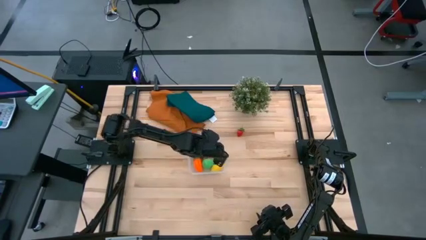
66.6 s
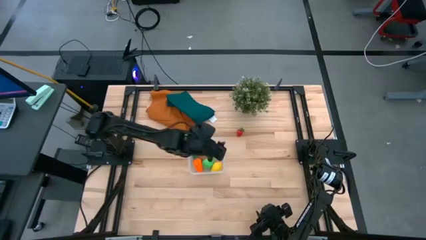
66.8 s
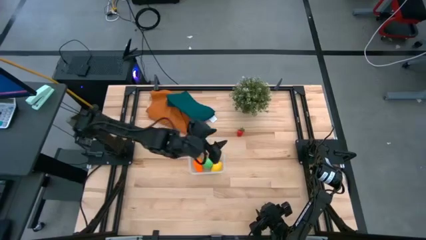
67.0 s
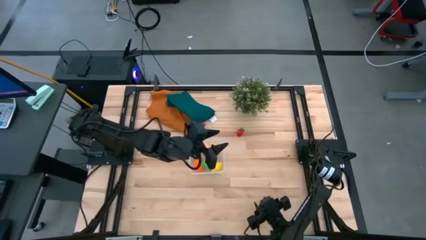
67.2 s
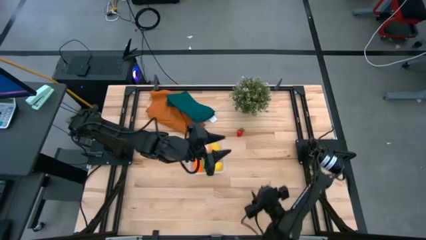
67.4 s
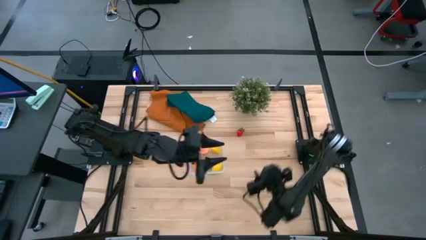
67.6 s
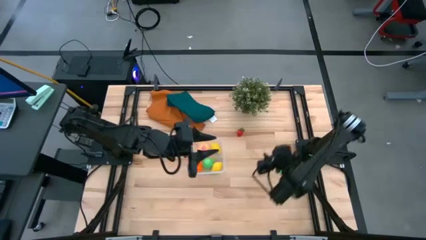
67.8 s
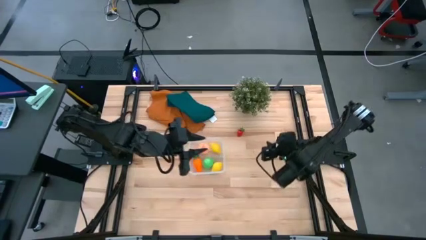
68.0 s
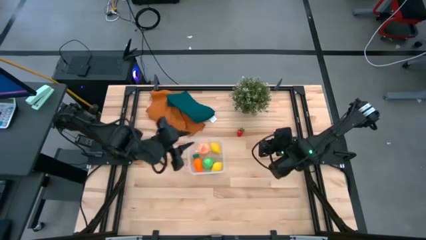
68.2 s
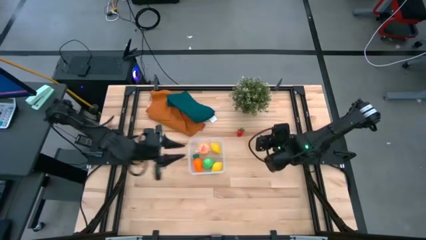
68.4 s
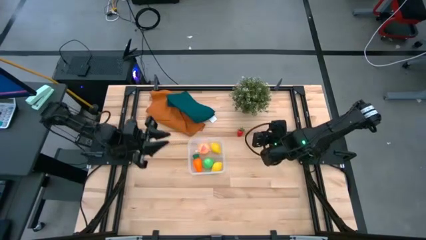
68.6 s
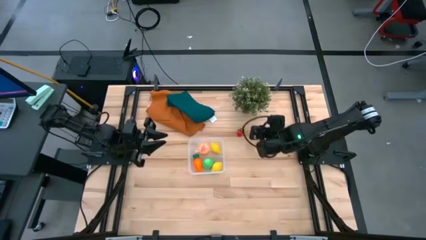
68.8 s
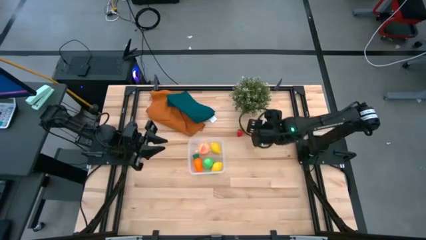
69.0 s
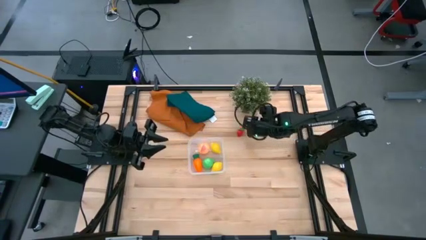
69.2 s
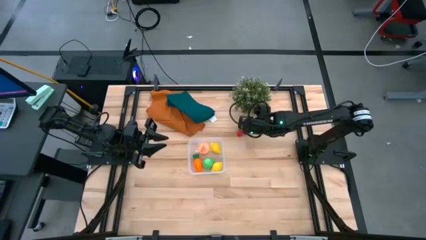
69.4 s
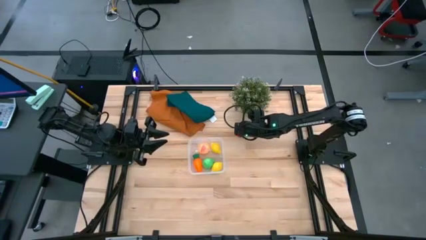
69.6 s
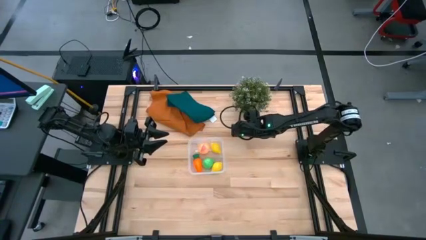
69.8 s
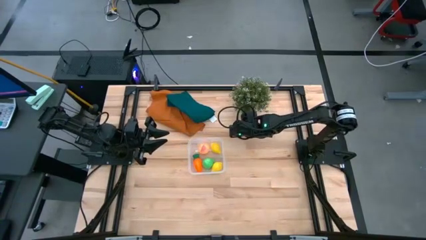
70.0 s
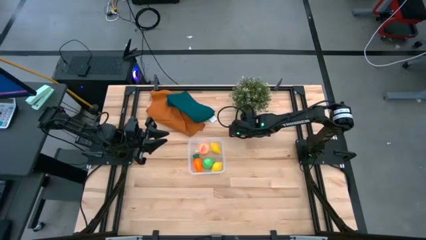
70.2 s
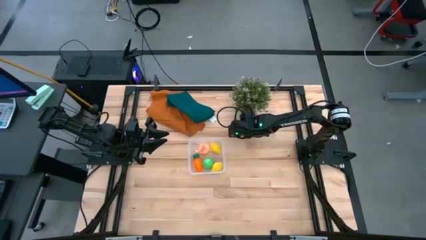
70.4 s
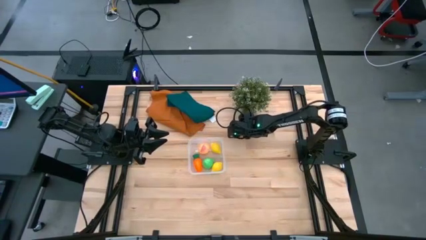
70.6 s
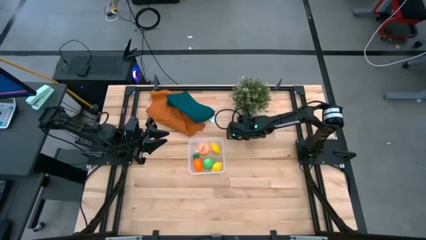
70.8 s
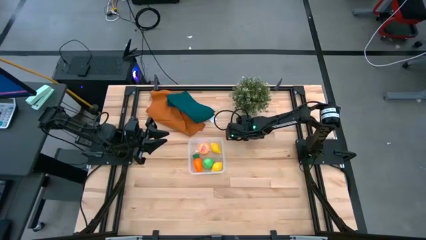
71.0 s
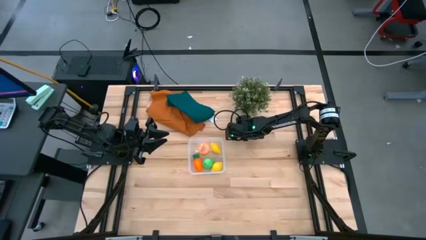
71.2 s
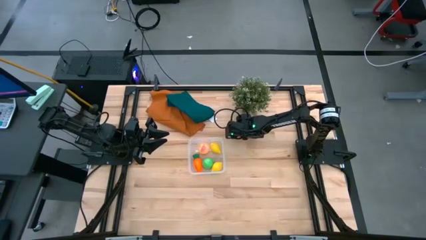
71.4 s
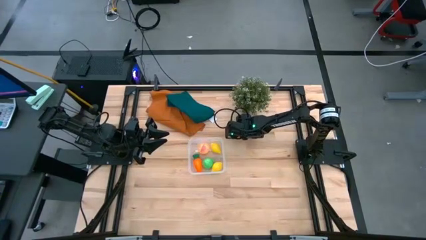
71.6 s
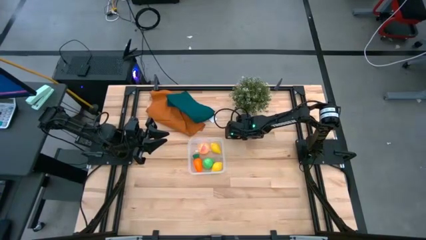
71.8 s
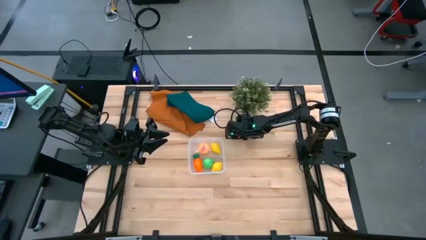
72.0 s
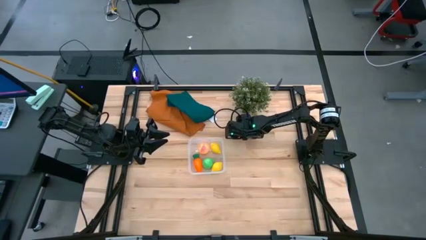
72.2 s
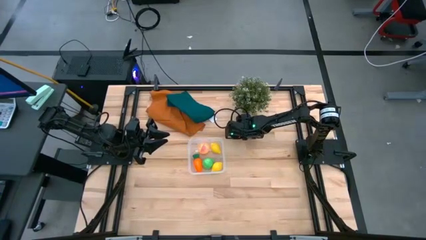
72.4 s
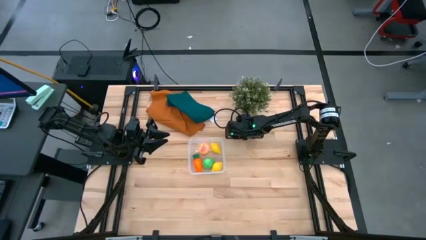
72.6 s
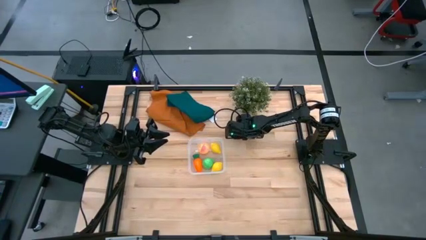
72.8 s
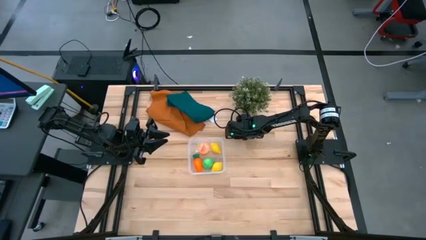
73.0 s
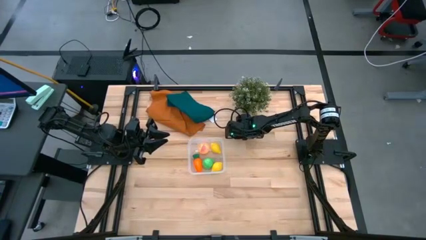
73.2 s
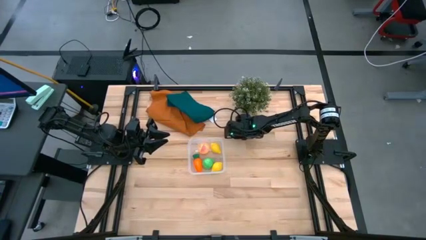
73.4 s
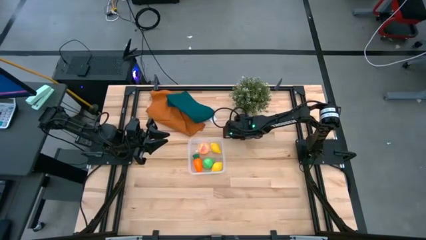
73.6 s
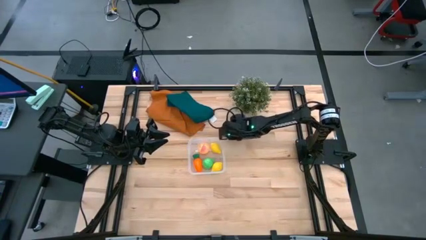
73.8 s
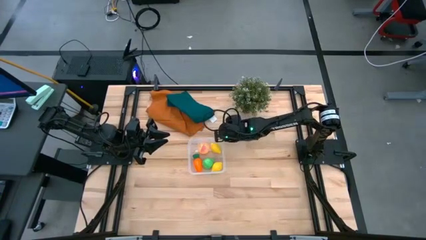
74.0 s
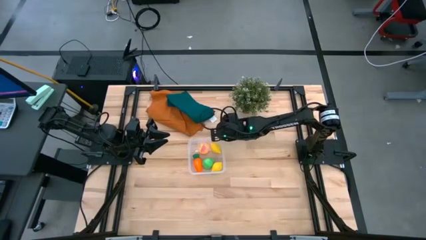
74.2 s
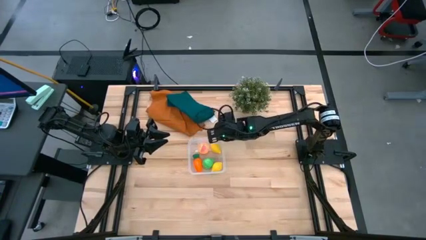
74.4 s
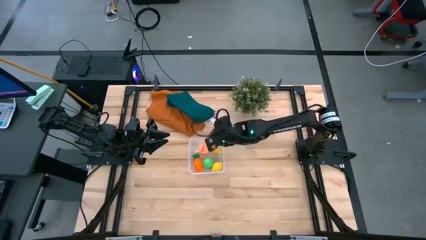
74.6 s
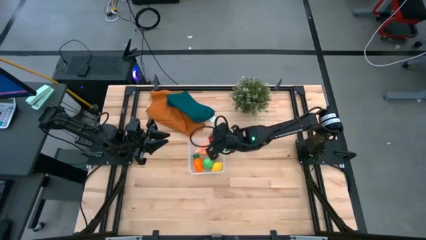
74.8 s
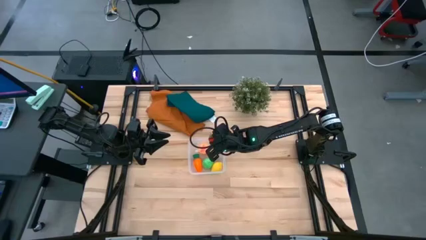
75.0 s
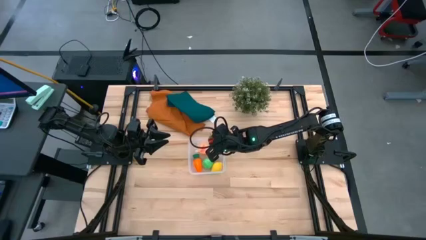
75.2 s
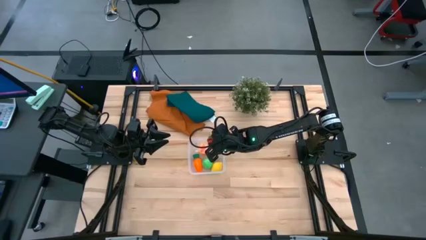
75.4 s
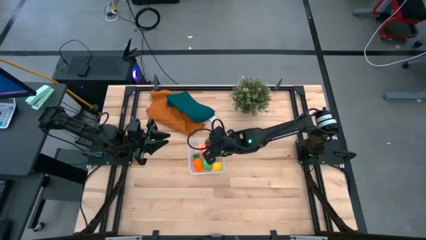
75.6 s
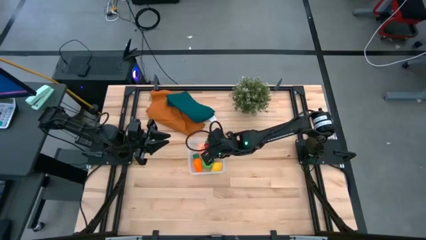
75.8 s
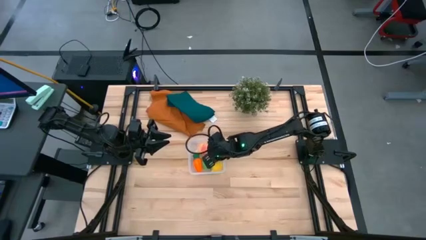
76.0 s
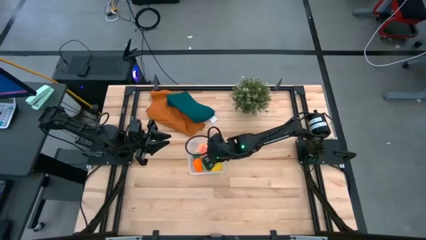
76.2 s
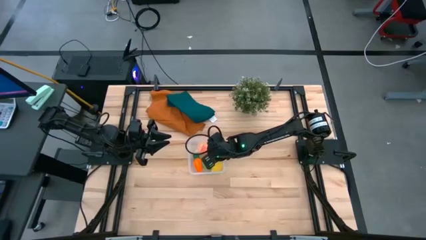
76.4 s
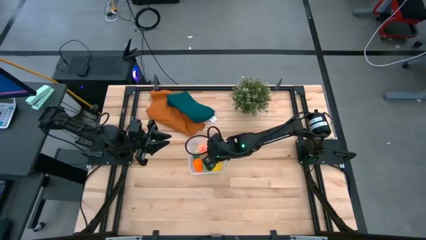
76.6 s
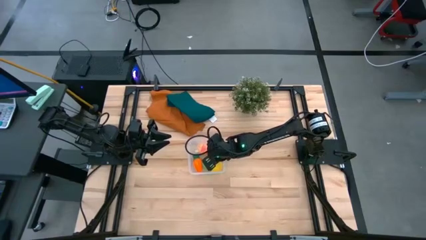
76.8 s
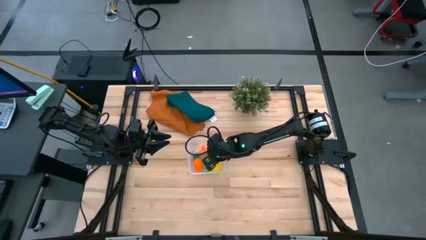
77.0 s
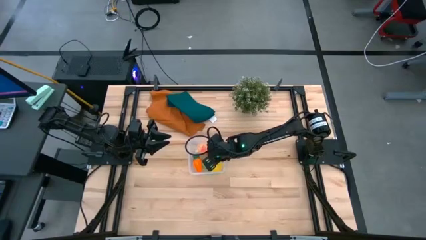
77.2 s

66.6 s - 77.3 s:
Task: Pick and placing Produce into tupperware
Put the red strawberry into the transparent container

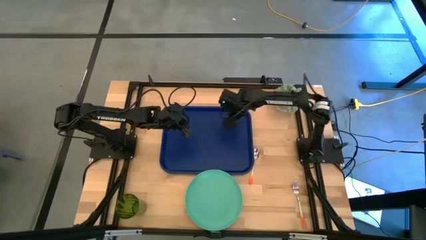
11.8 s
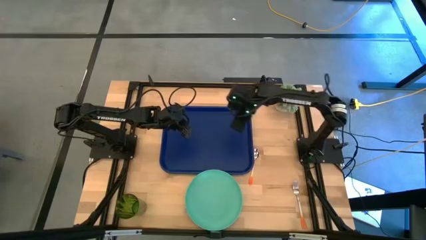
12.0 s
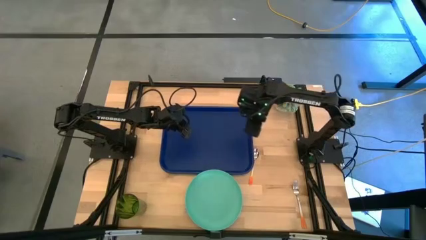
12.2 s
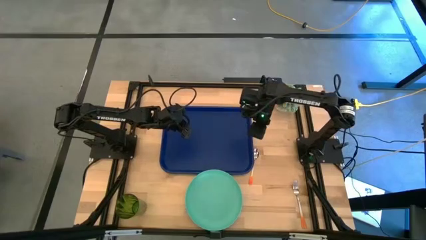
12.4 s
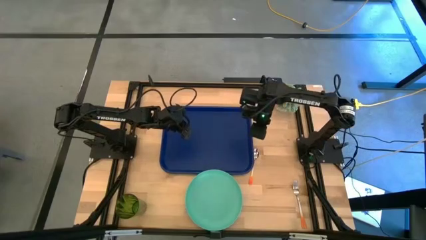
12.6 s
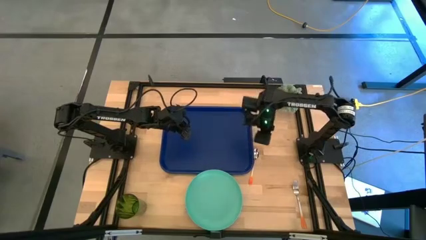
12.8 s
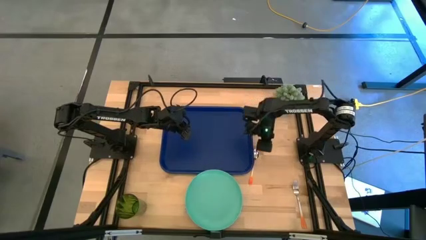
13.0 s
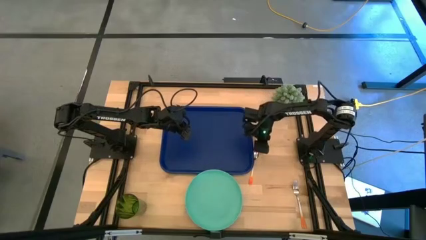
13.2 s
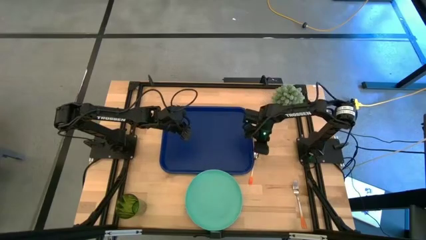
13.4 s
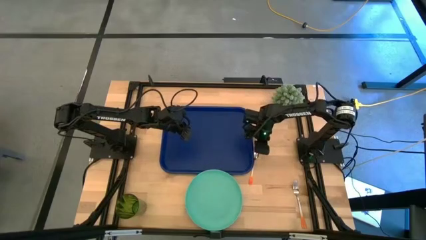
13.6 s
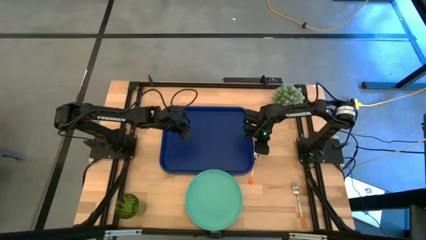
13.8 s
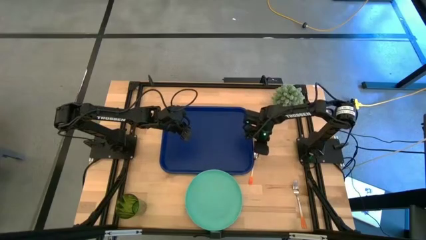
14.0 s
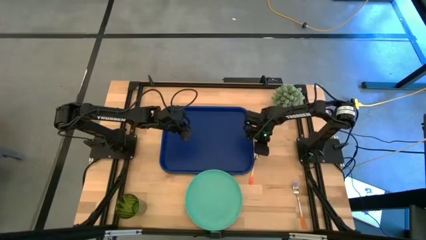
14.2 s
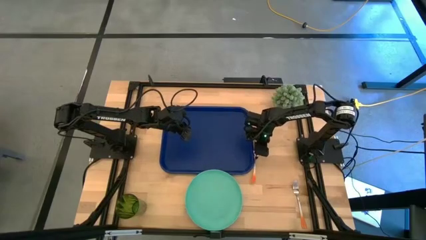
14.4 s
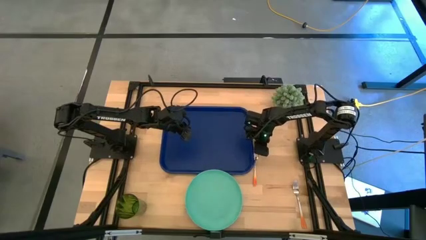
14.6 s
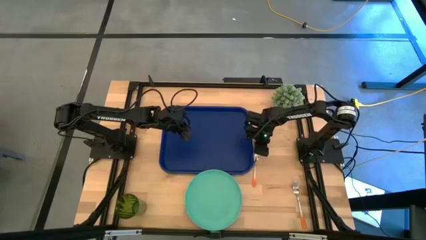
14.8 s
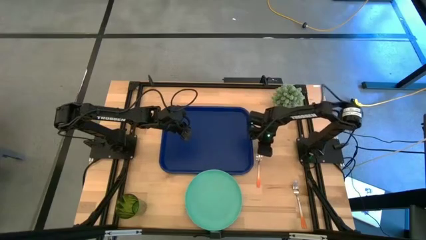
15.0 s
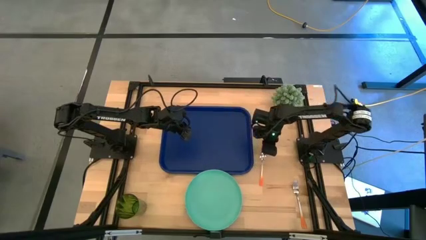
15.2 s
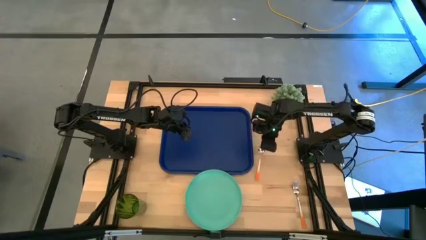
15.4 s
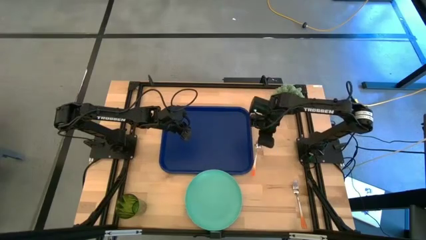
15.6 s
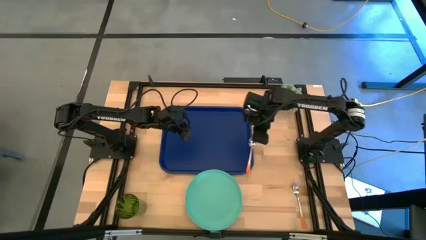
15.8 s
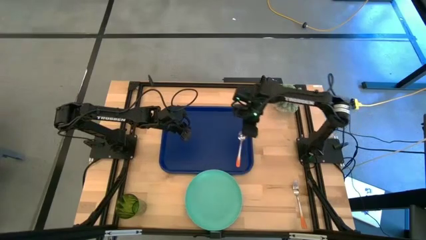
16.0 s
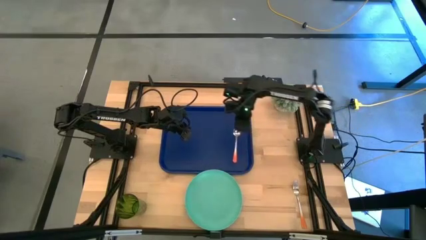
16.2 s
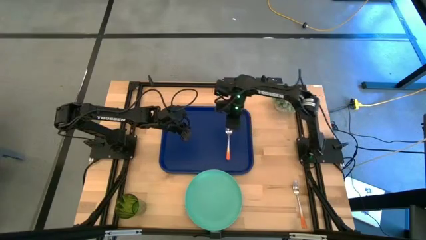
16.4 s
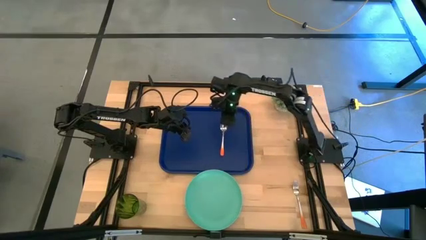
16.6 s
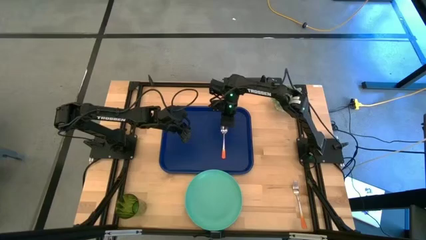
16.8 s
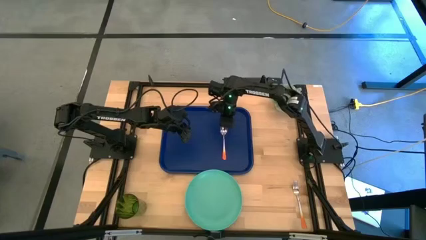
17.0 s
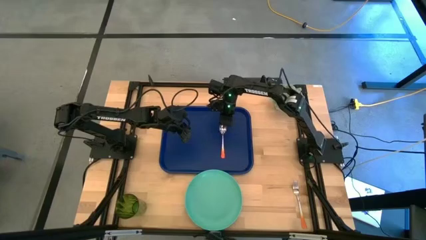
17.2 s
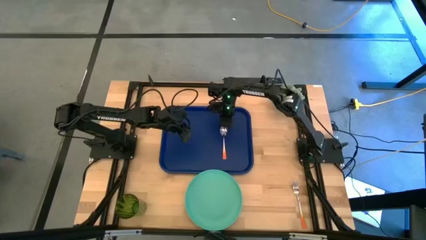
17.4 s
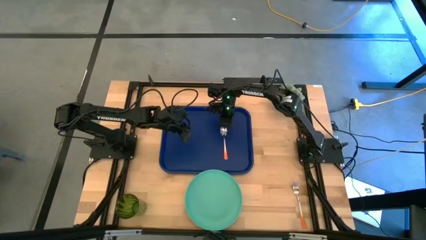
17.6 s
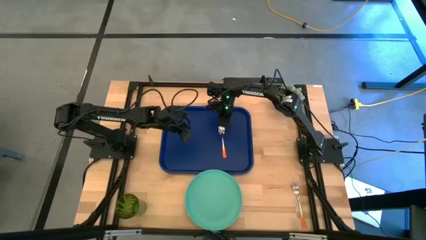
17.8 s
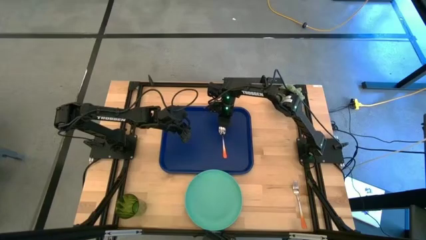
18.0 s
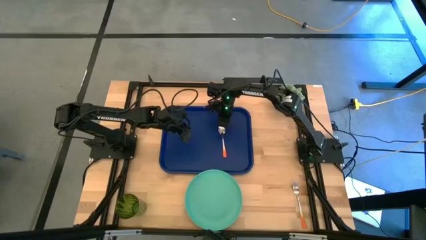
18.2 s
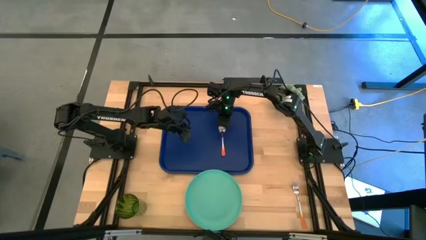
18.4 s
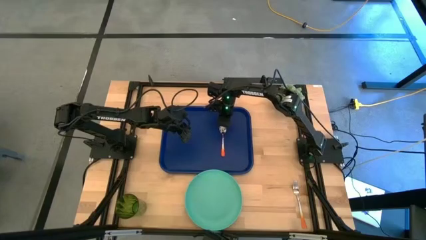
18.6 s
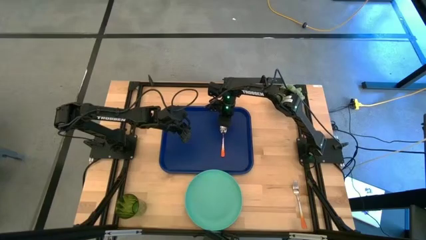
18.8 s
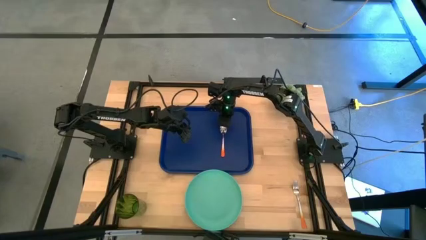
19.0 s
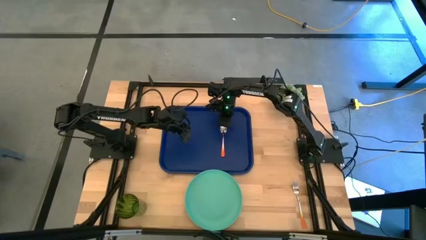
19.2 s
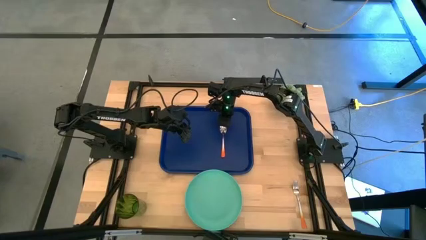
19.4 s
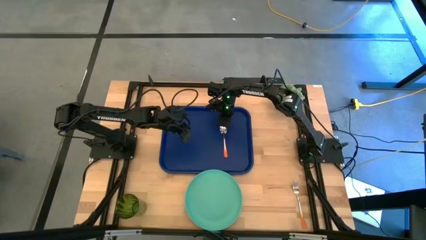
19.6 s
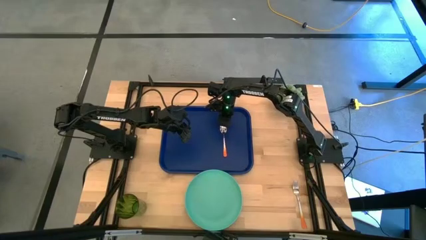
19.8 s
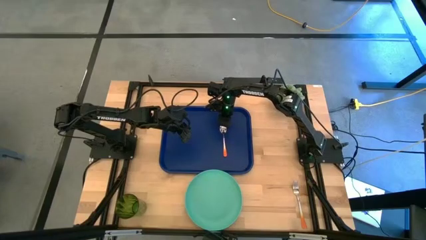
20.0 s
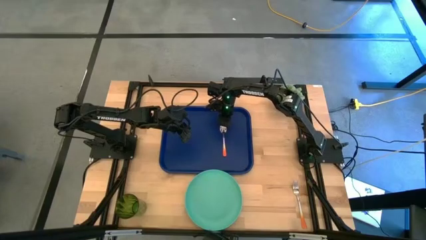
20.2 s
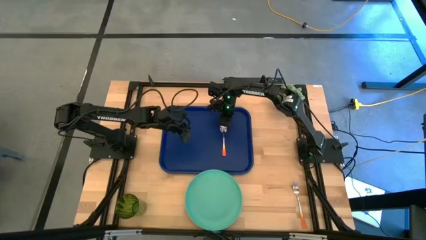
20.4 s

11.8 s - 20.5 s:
Task: Pick and place plate/cup/fork/spoon on tray
Put the orange spoon on the blue serving tray
